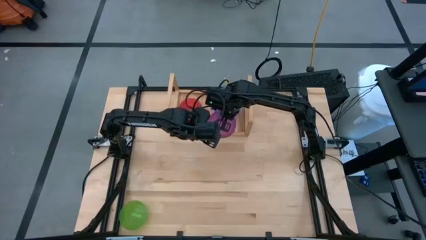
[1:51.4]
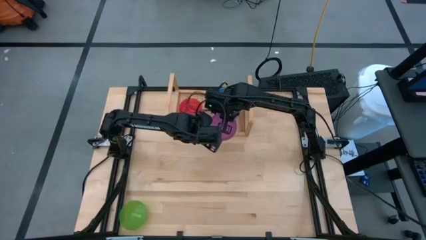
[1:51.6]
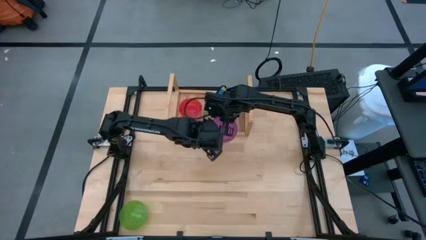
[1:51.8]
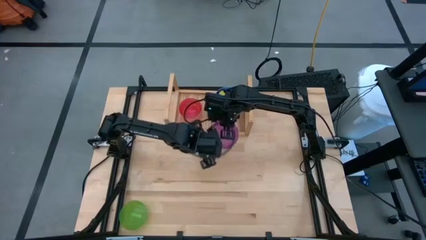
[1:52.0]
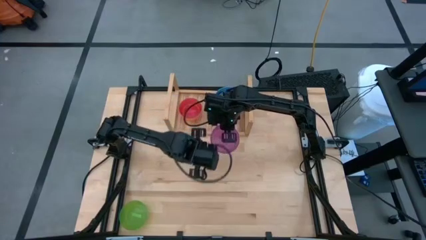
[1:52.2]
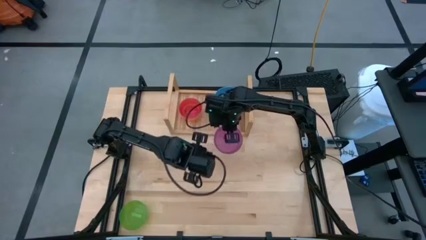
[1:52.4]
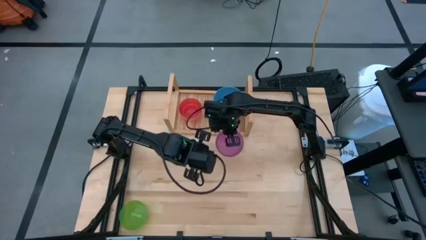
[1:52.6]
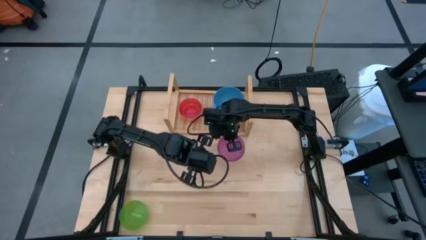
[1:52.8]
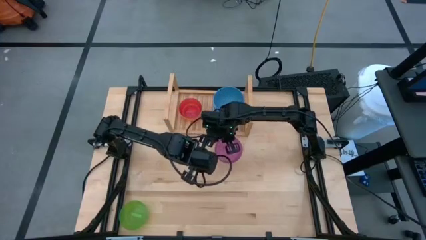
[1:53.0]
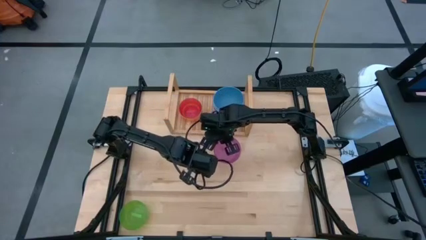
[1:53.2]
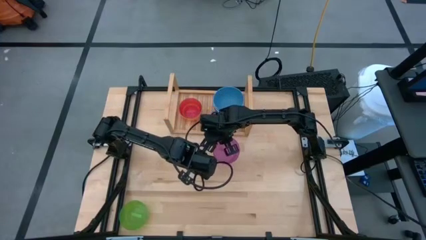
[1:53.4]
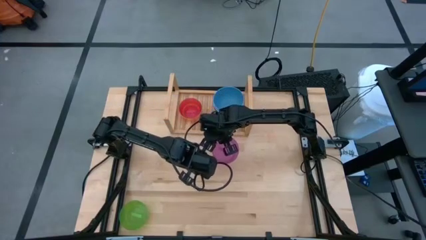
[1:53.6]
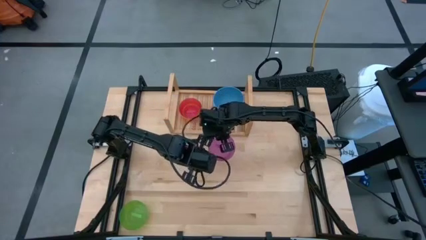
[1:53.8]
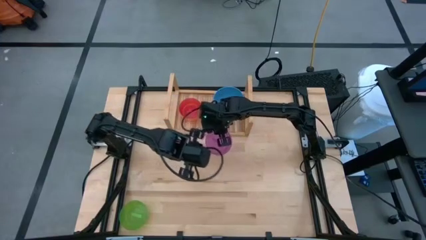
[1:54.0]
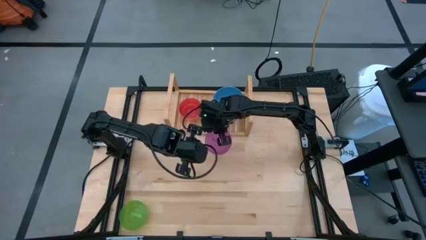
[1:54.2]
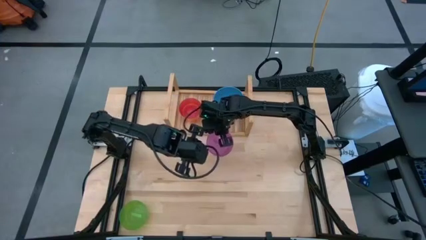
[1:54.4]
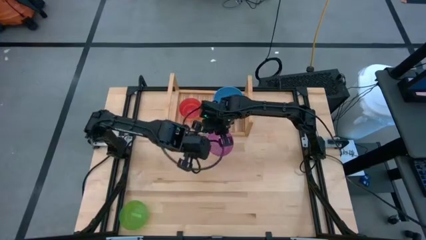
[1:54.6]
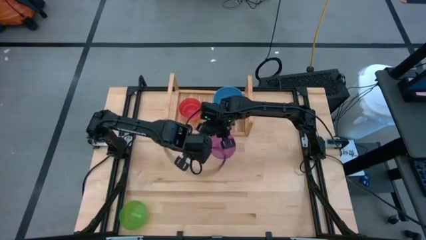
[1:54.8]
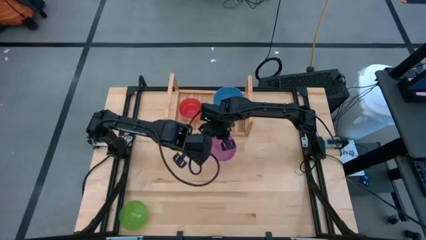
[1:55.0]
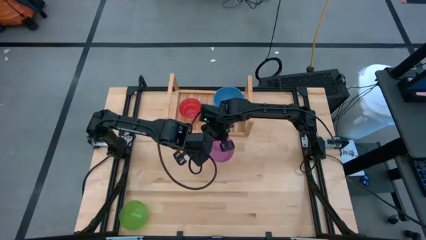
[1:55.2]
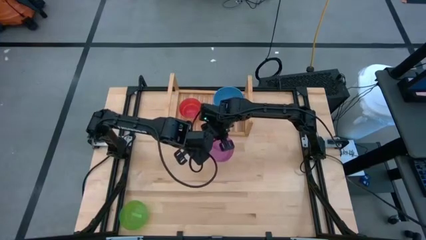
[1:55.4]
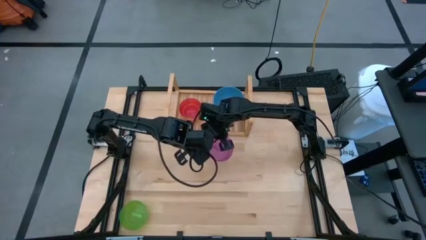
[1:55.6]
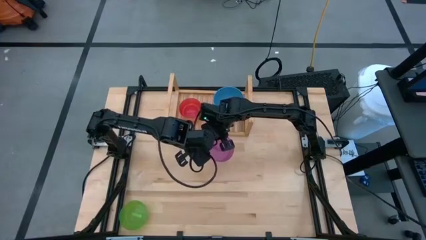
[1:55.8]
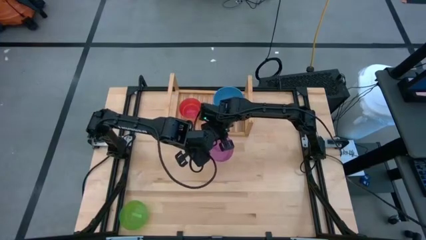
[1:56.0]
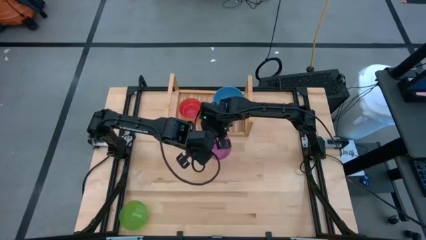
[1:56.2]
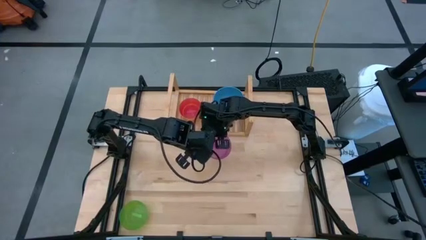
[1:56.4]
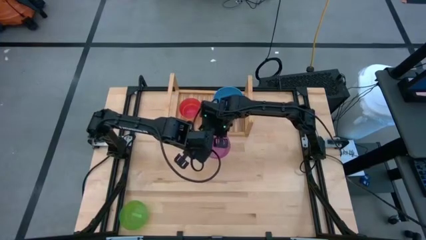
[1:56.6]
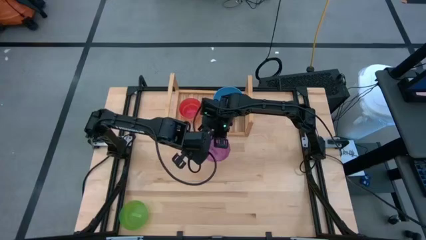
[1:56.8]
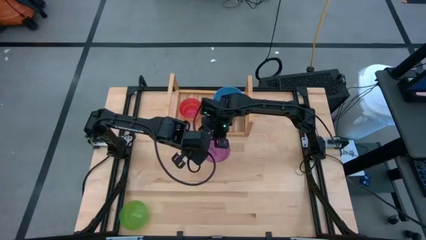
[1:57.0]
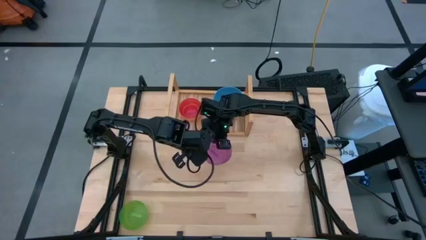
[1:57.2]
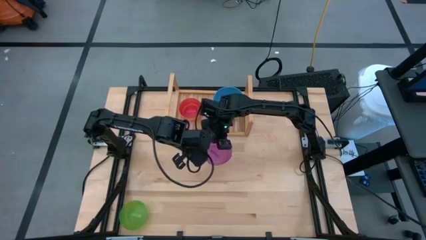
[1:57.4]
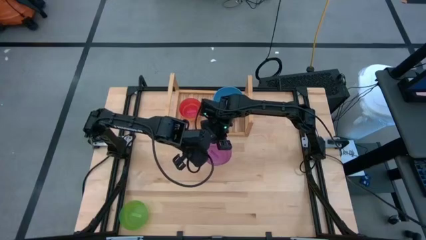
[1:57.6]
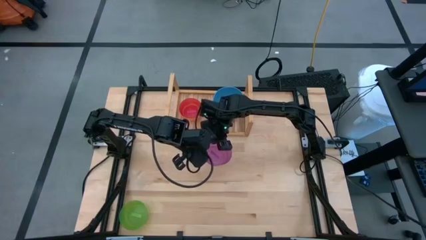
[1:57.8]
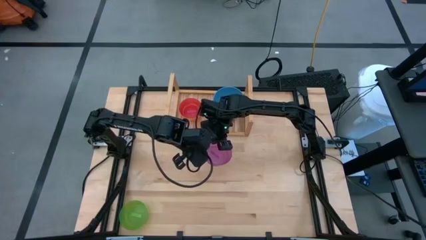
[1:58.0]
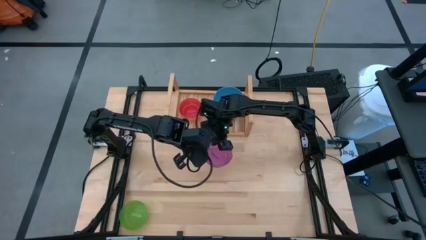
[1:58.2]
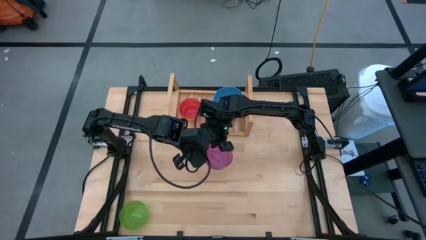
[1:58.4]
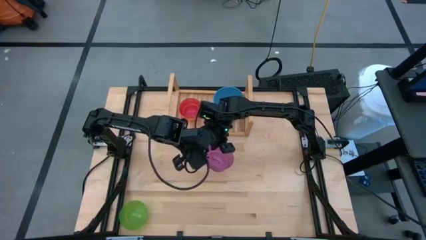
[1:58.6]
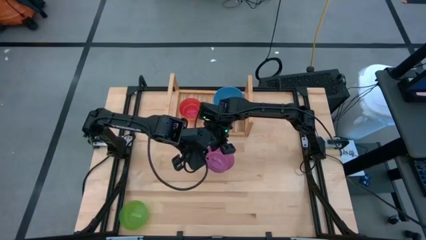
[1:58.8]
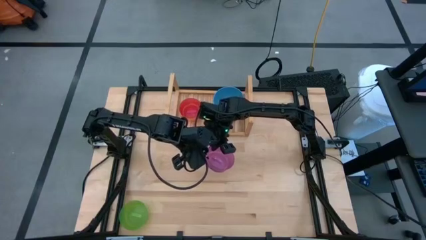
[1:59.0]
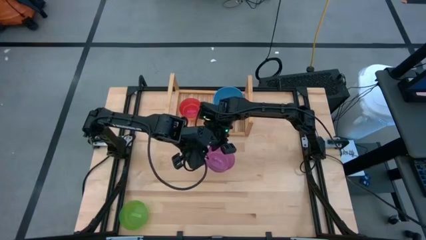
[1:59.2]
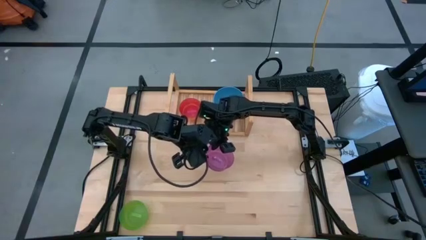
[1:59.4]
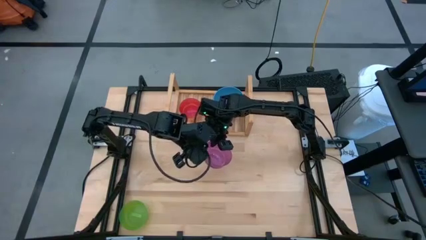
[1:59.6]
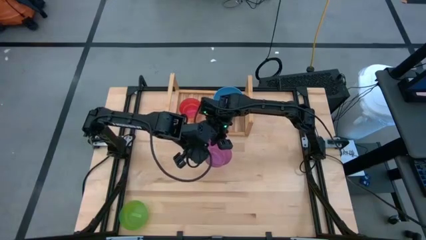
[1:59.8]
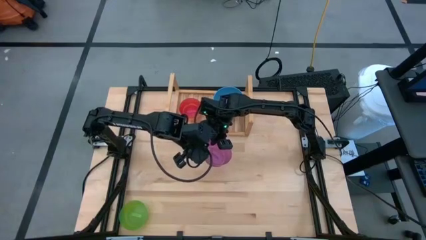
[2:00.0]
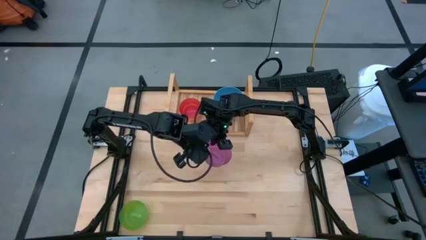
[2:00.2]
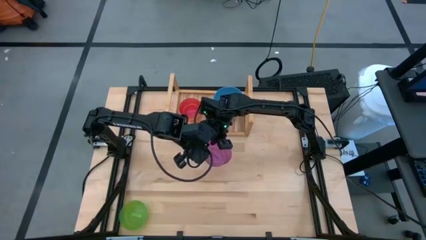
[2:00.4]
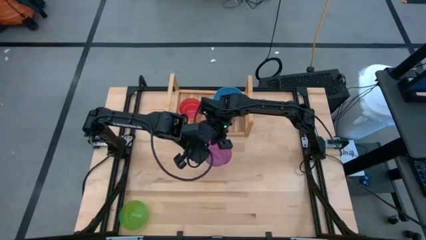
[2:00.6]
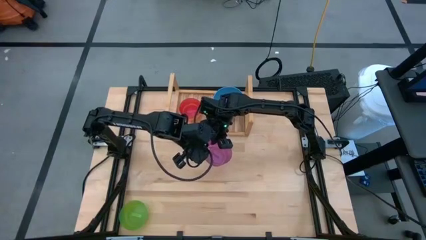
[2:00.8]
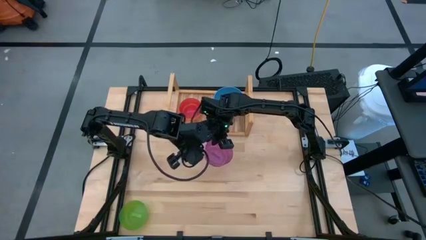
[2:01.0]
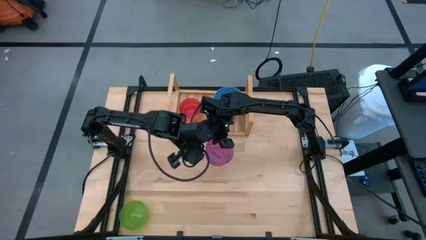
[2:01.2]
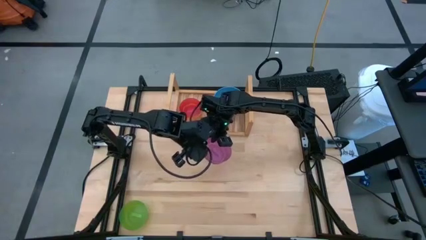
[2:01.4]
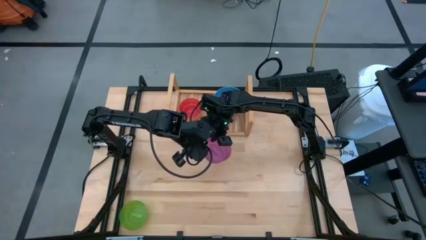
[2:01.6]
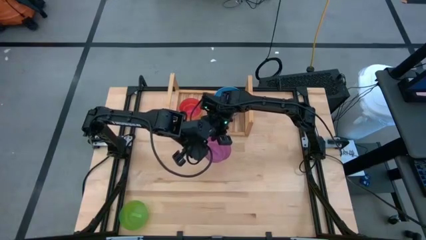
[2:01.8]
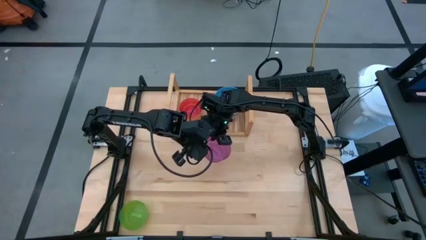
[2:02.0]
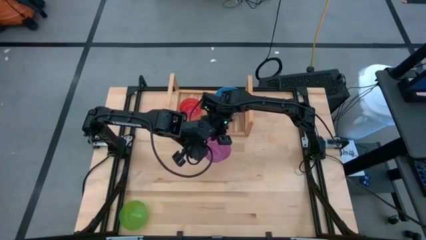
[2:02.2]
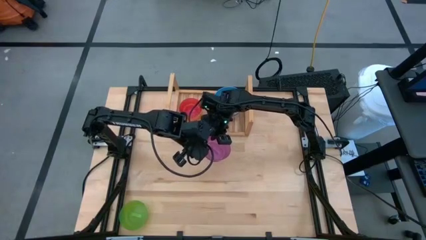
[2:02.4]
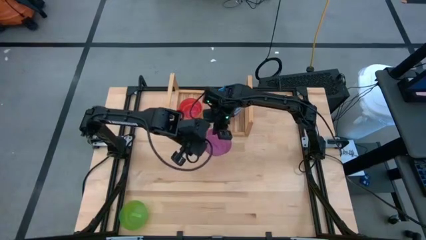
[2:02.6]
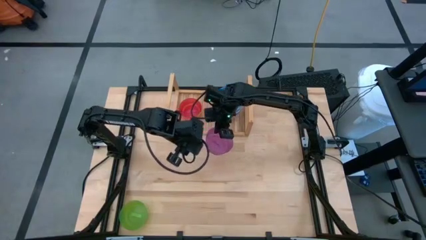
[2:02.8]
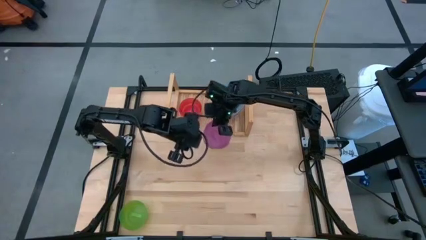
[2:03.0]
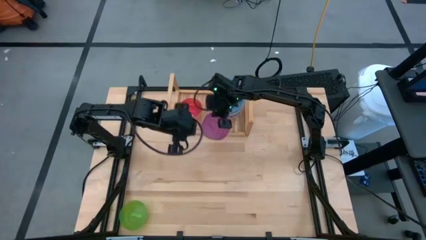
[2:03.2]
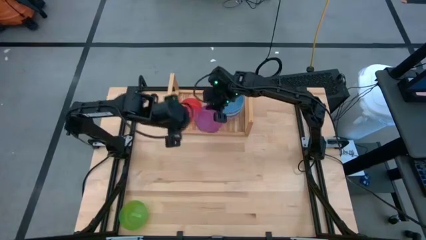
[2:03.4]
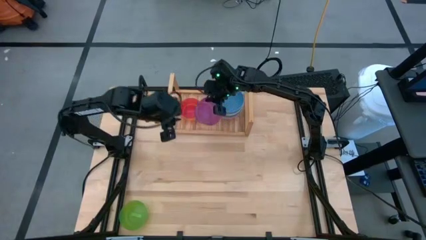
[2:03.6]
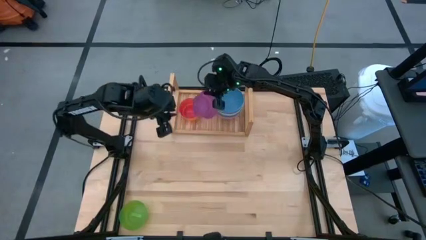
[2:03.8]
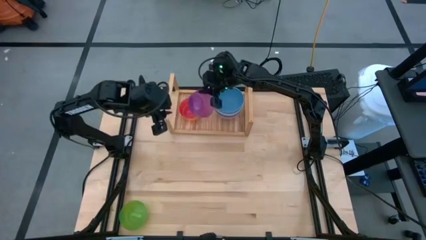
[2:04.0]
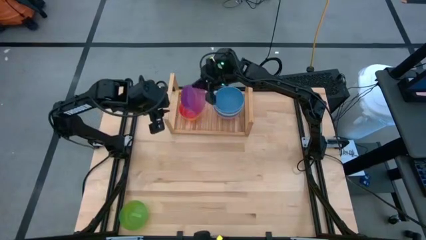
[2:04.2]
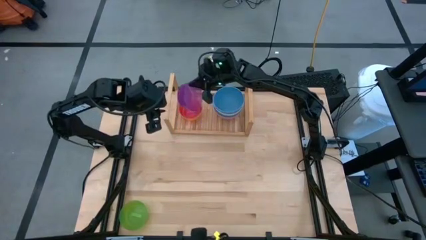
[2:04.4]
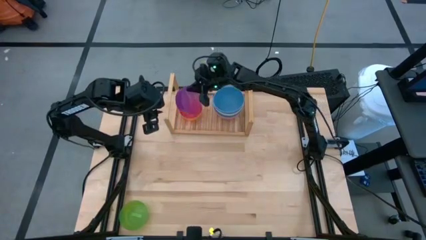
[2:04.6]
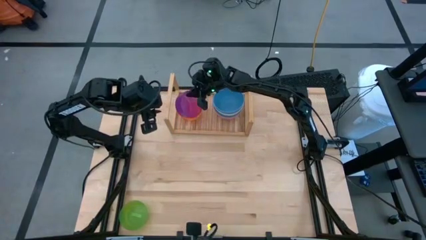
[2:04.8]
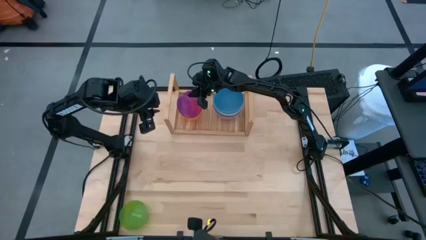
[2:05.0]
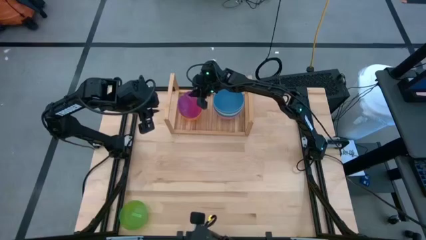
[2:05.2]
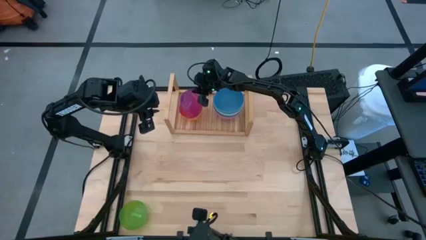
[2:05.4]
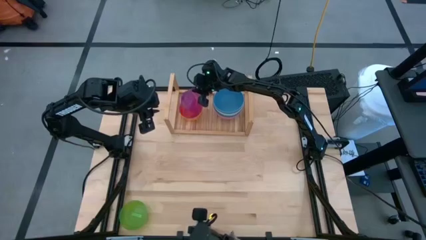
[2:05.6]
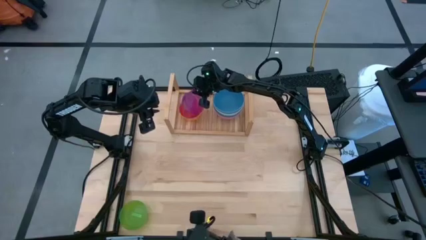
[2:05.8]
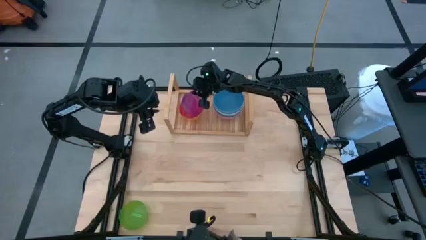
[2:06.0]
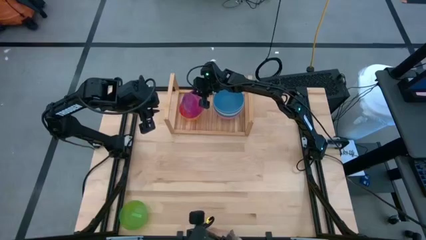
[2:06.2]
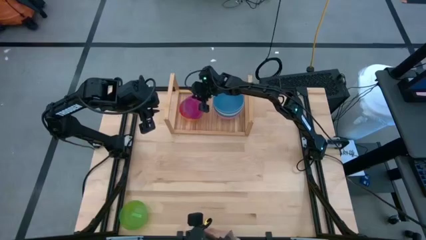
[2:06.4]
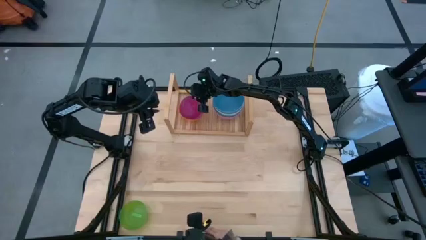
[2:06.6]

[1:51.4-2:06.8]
Task: Place and stack bowls onto a shelf
Stack the violet bowl onto the red bowl
